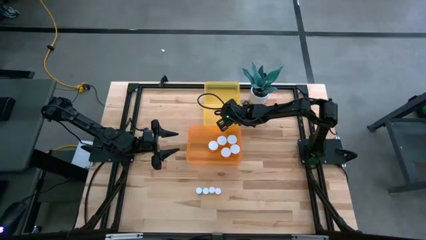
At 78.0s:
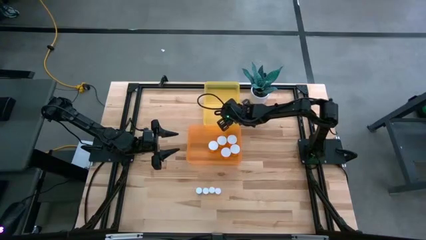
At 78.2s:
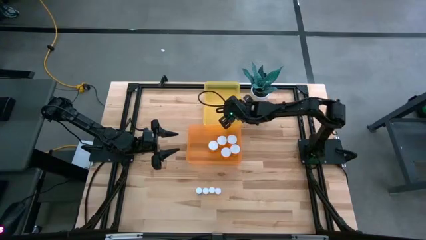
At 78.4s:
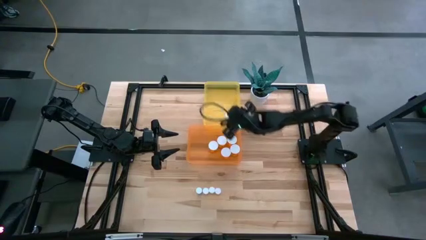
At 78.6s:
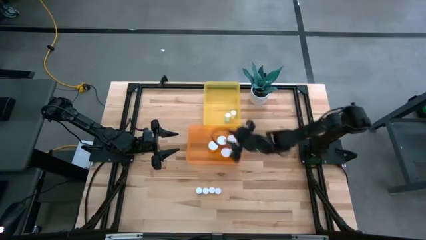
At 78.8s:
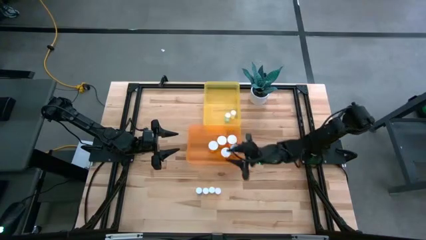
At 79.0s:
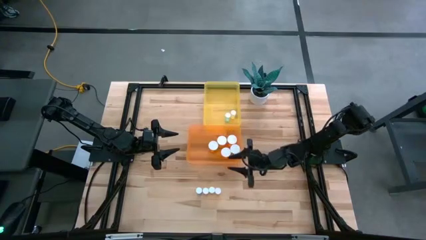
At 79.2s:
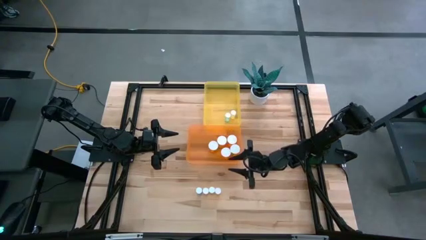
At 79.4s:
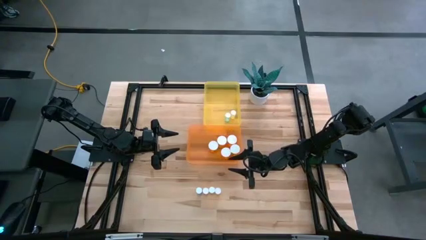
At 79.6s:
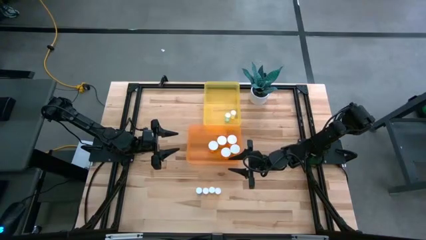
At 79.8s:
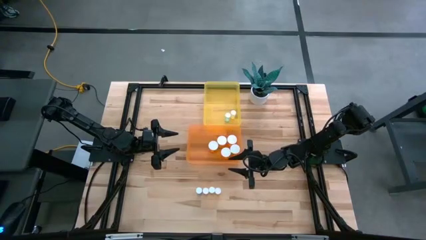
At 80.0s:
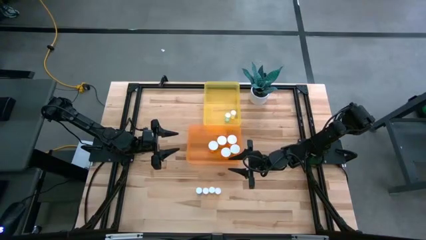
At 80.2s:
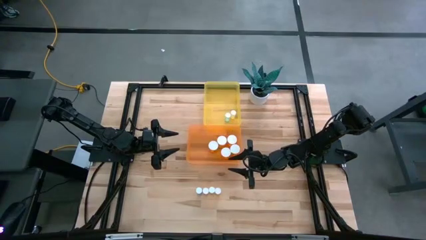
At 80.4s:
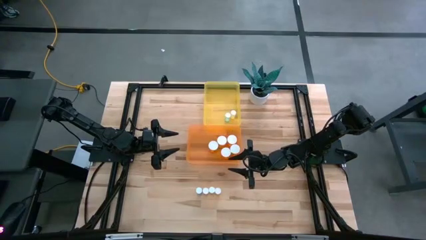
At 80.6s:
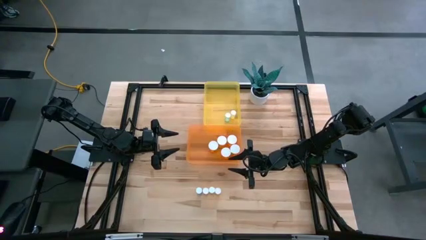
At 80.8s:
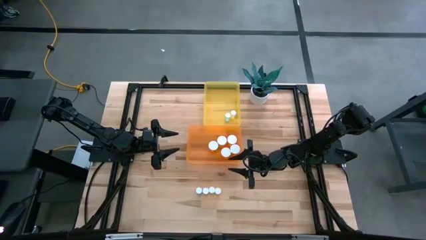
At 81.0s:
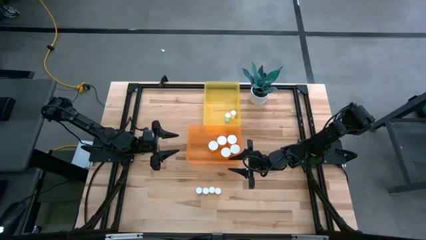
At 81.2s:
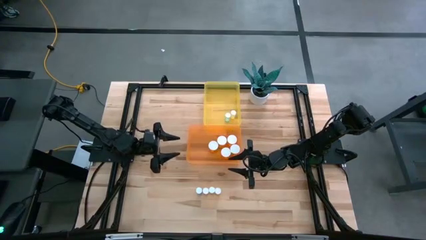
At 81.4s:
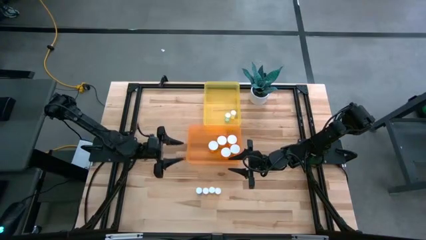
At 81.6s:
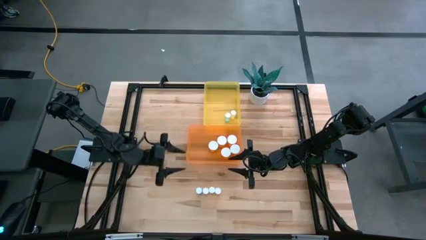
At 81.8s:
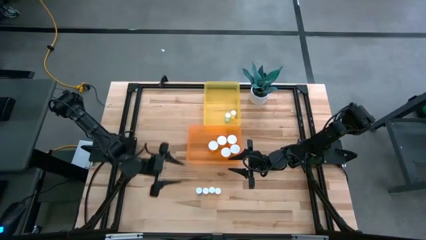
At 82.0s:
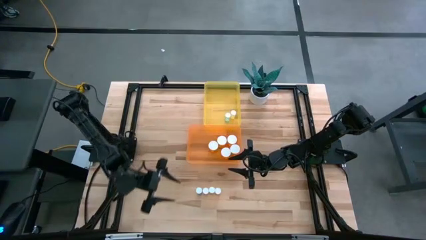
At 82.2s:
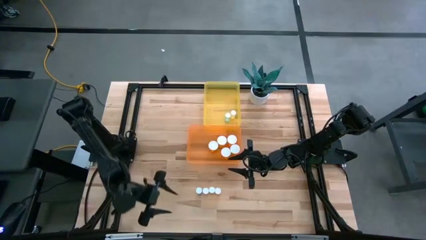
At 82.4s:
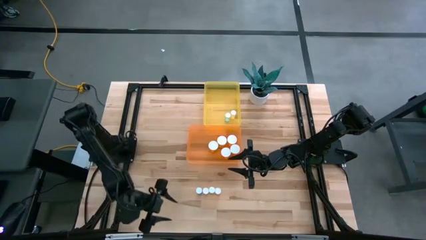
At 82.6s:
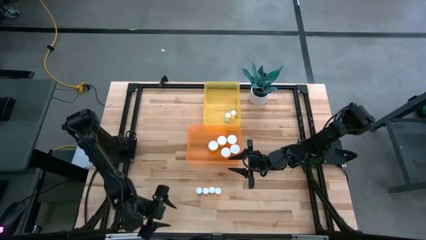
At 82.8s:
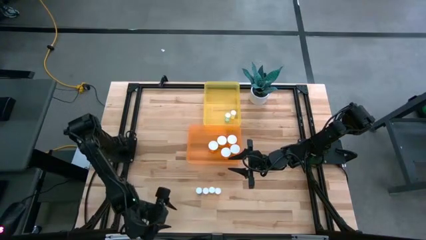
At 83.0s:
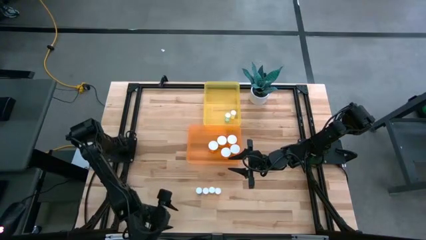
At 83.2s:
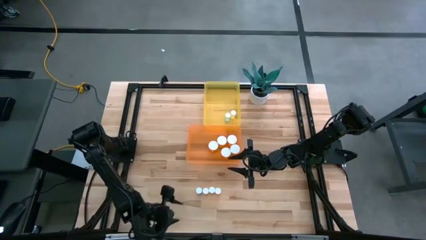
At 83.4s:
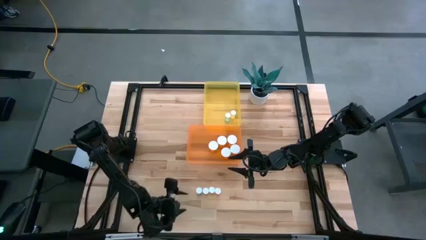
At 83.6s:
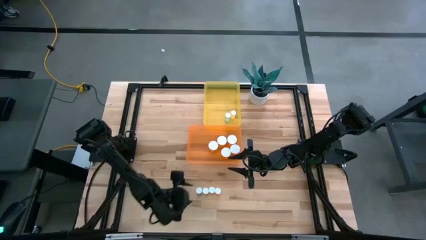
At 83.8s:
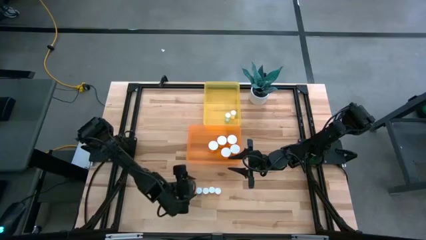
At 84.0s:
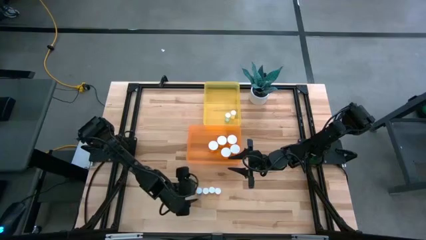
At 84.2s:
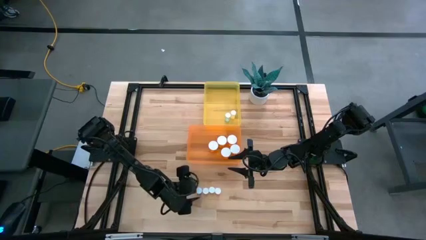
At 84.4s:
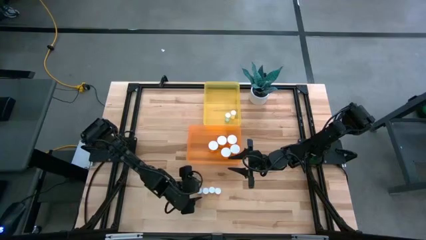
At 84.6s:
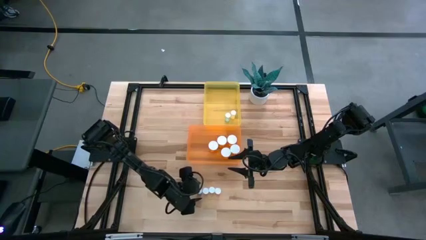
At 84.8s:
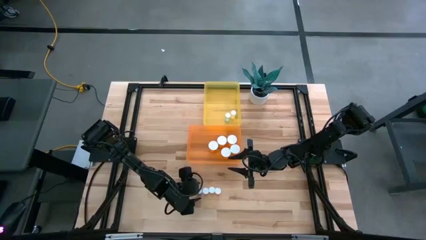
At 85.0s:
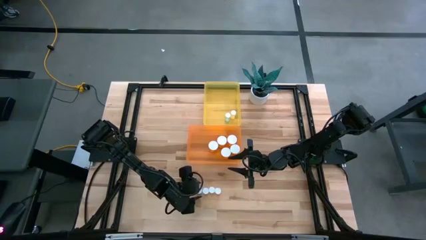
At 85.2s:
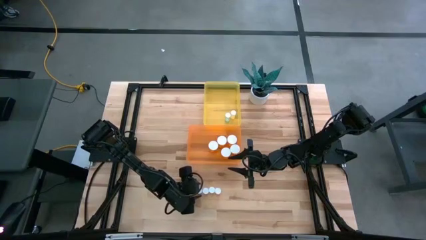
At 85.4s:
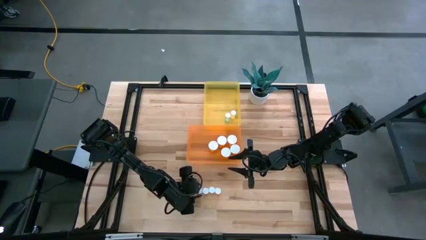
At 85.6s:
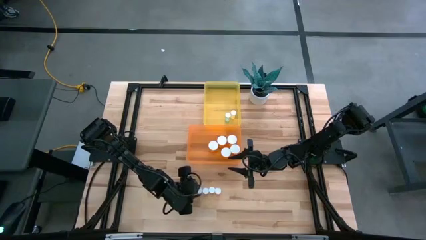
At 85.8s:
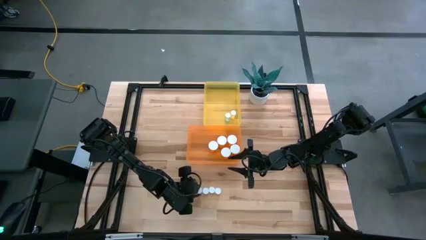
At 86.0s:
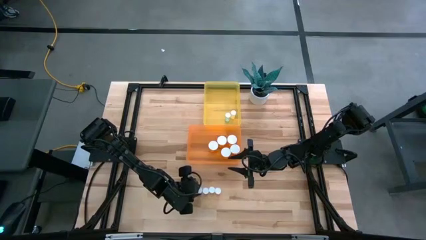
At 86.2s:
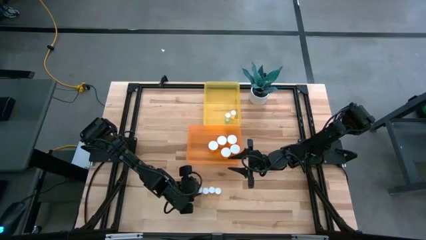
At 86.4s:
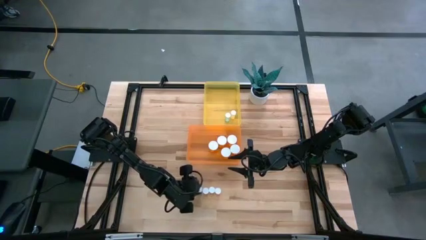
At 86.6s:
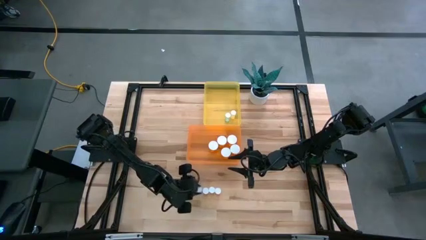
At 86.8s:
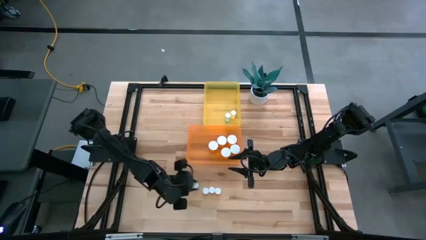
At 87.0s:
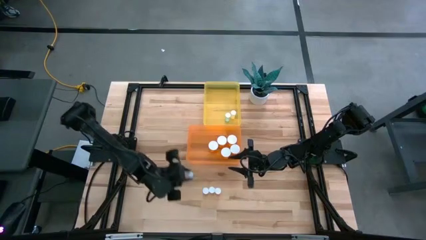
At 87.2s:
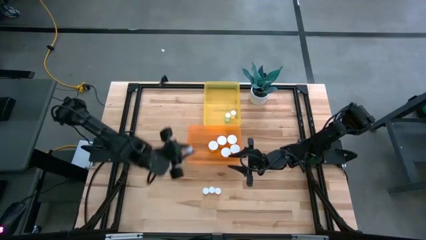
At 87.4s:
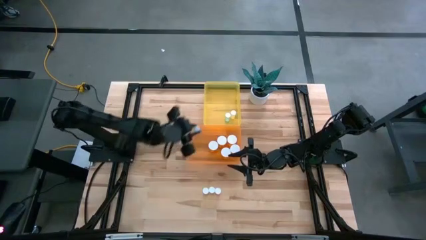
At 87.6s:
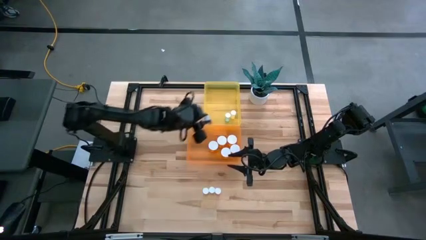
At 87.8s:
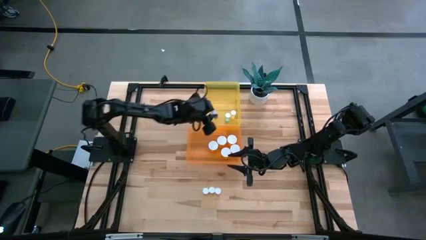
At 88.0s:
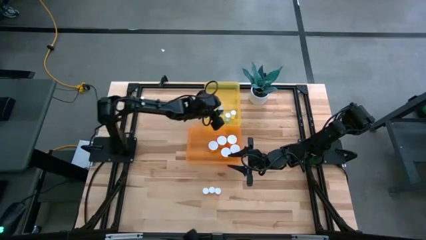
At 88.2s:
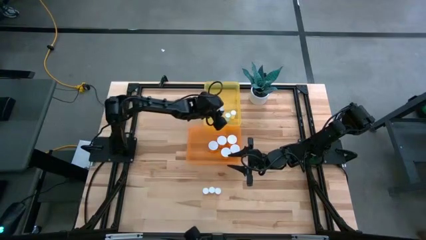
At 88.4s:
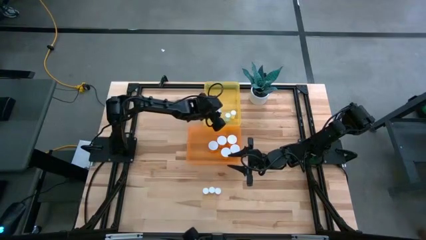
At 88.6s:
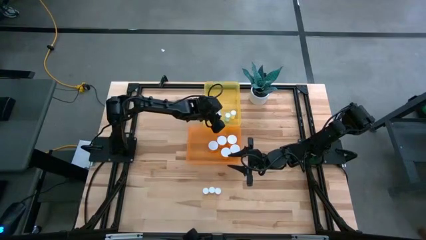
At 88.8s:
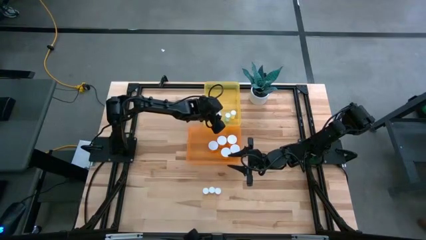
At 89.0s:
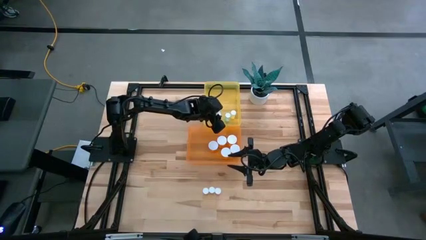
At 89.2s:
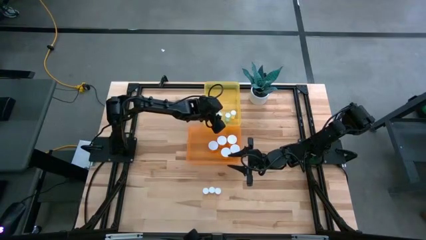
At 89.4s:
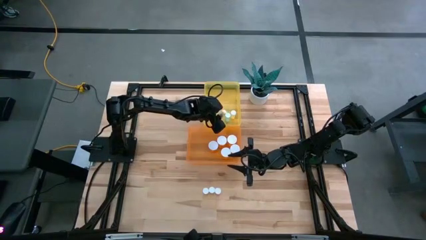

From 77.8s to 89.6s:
Task: Pick and place medicine bottles into bin by pill shape (circle, oval)
Put the small blue pill bottle into the yellow bin
